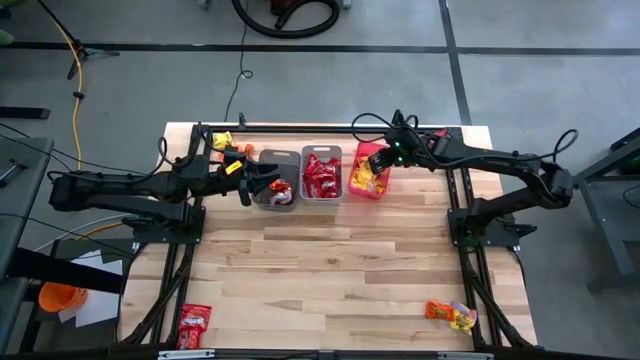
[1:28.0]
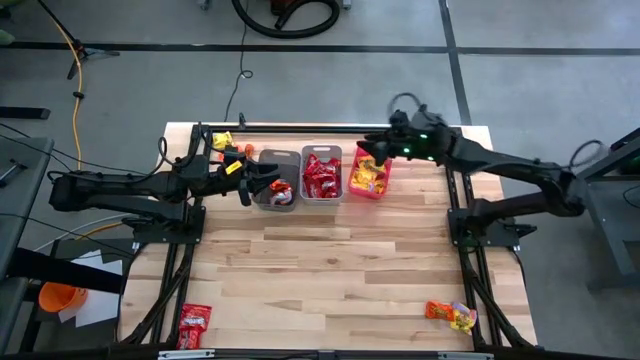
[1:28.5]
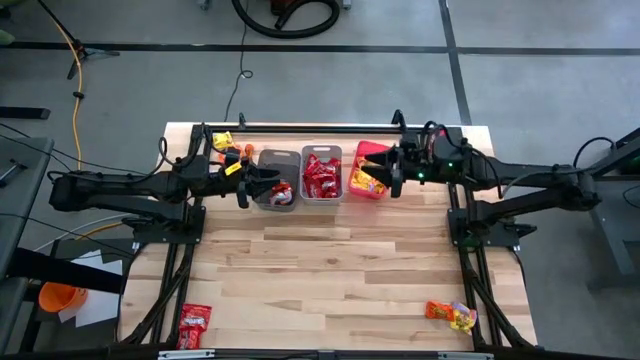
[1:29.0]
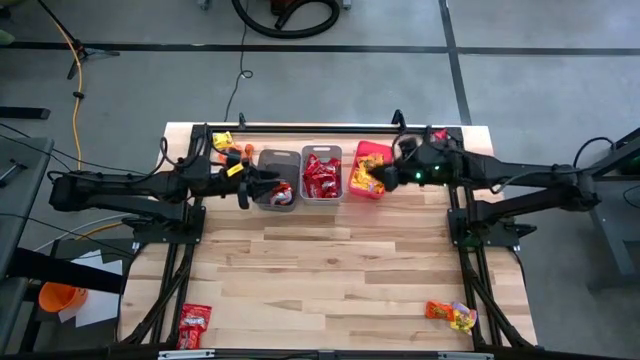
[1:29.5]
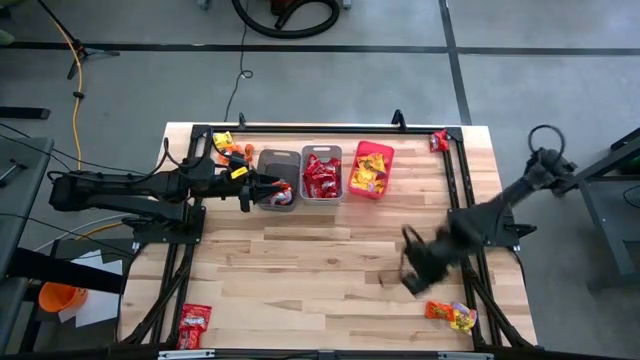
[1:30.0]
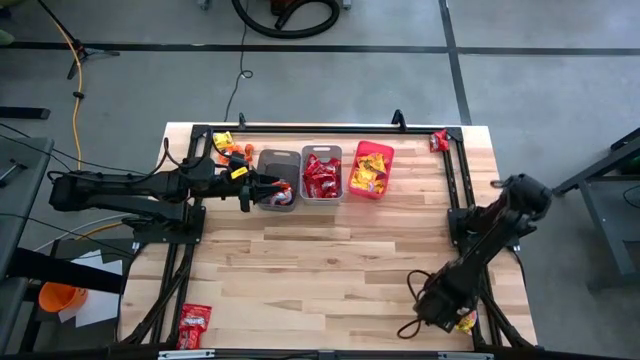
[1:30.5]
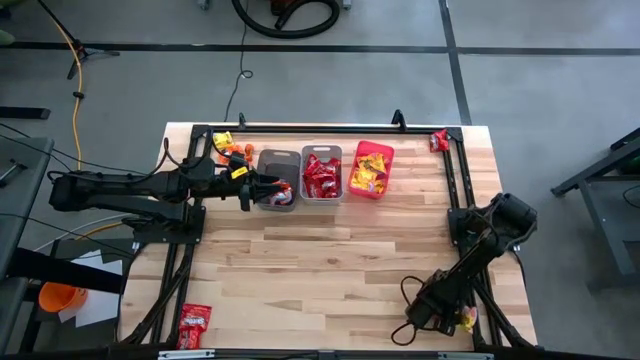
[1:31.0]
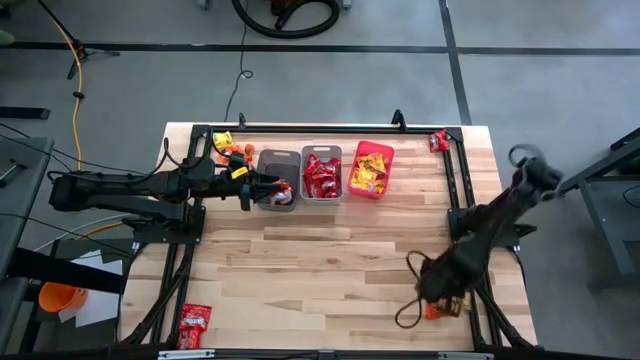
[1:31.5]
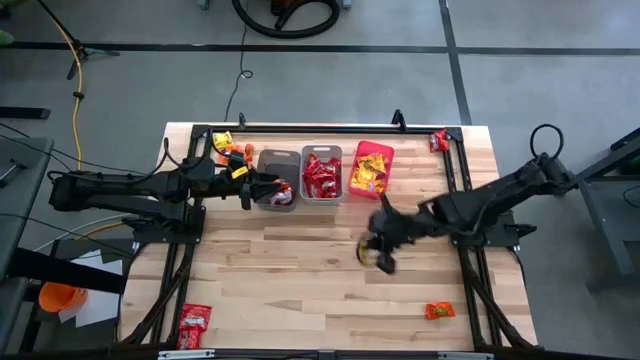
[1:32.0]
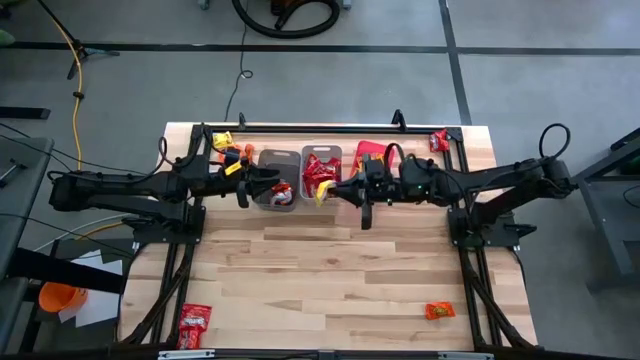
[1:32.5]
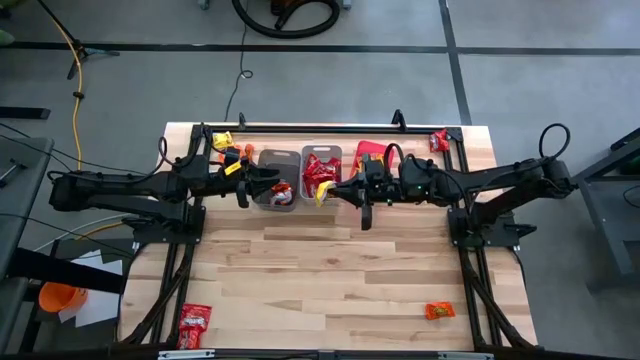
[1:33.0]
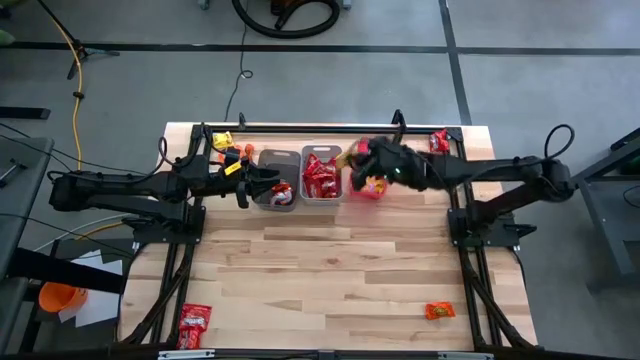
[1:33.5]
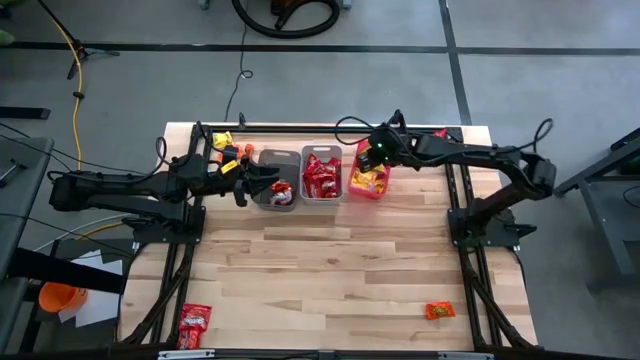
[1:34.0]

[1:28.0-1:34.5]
Task: Sort candy
Put the bottom right yellow candy into the red bin

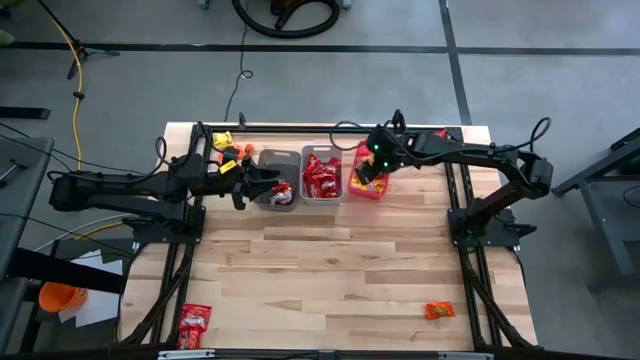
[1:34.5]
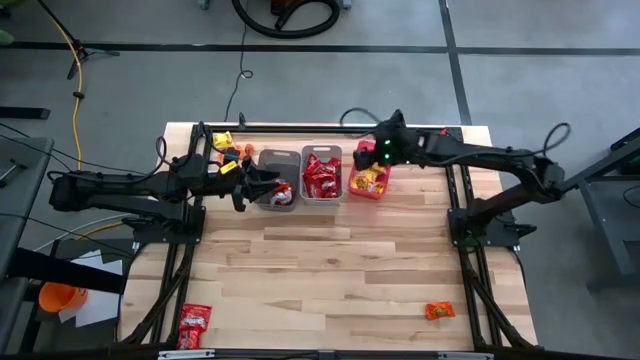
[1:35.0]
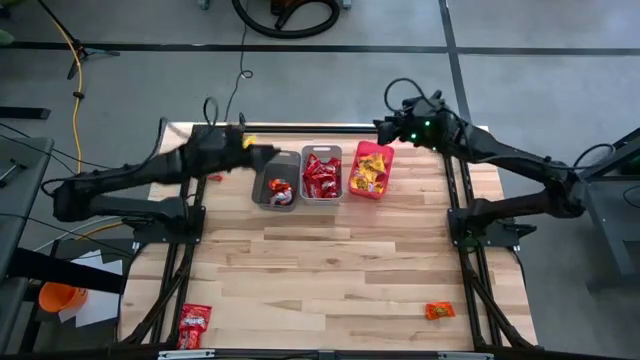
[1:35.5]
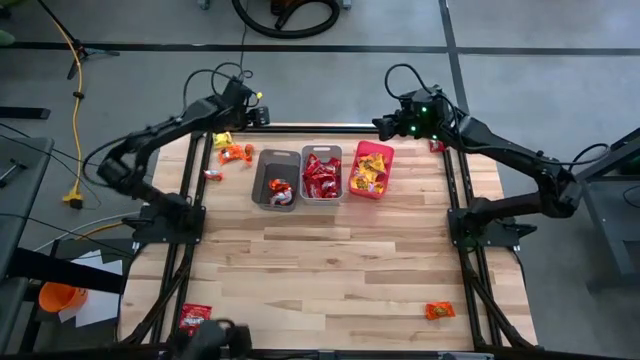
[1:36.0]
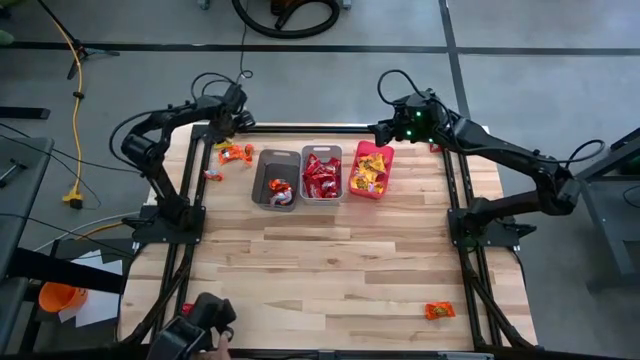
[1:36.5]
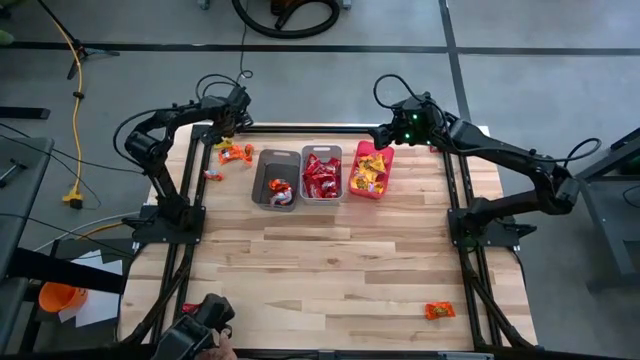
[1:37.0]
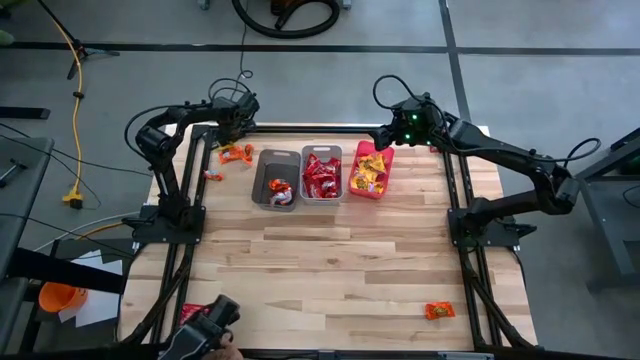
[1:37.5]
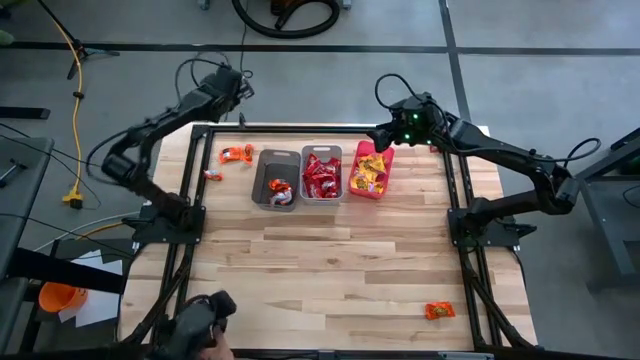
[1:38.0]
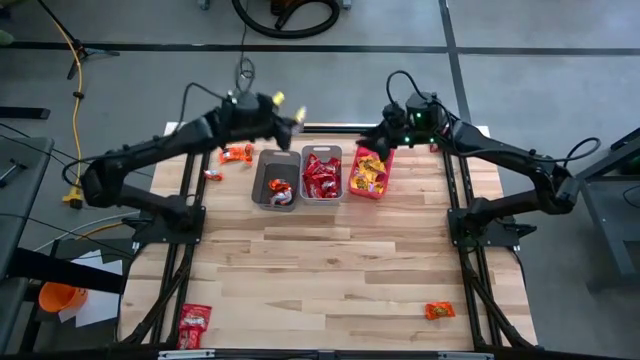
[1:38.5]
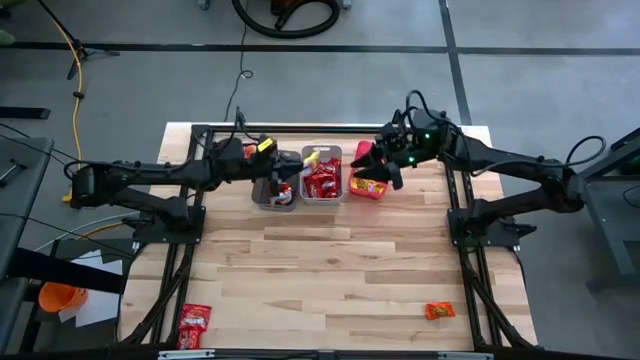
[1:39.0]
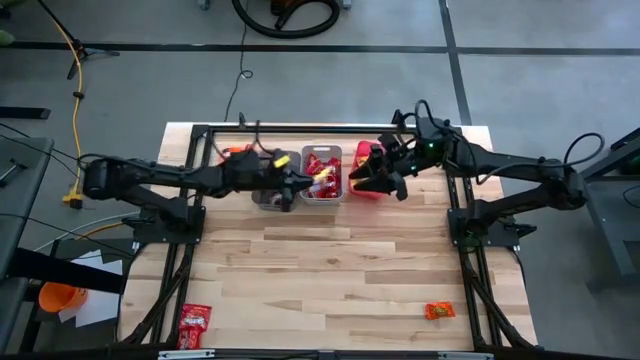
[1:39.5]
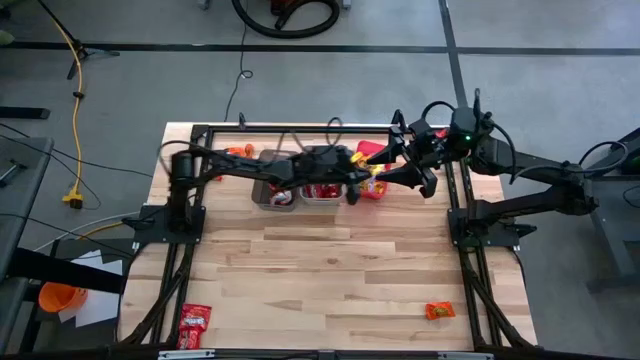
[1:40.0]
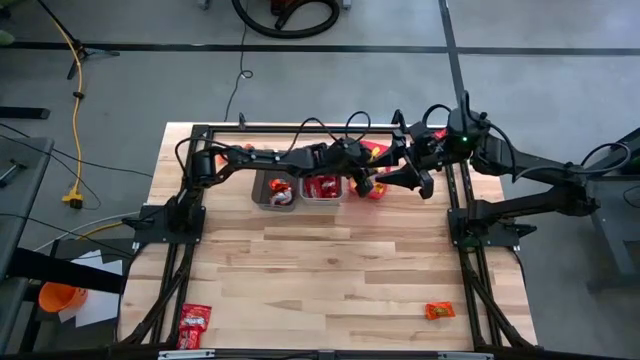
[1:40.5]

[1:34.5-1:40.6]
Put the to left yellow candy into the red bin

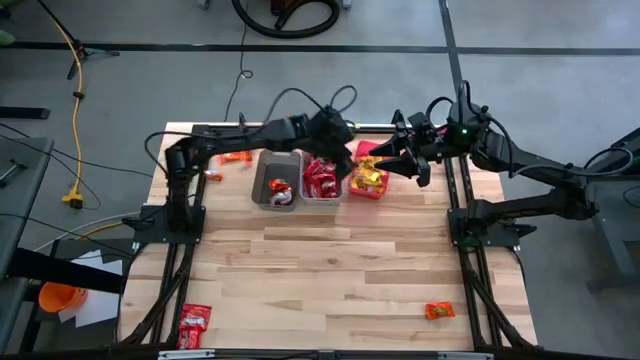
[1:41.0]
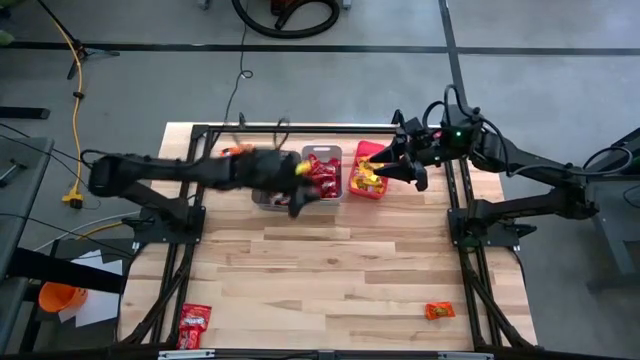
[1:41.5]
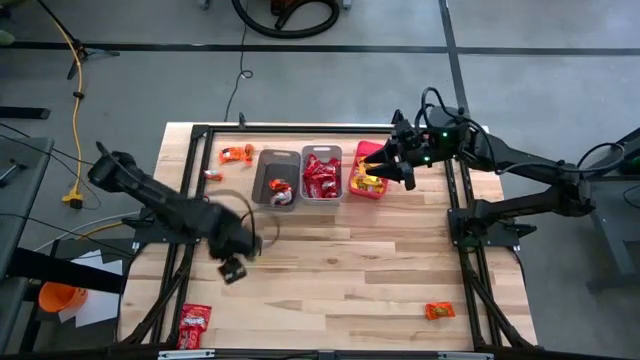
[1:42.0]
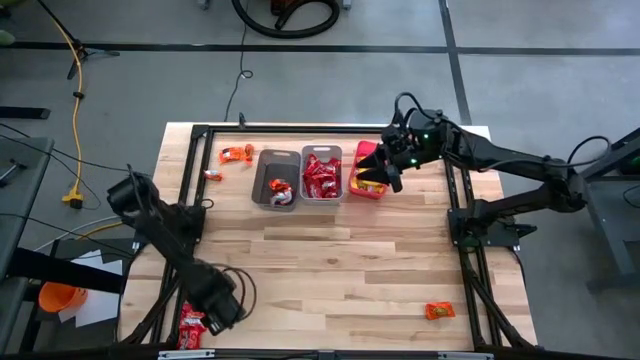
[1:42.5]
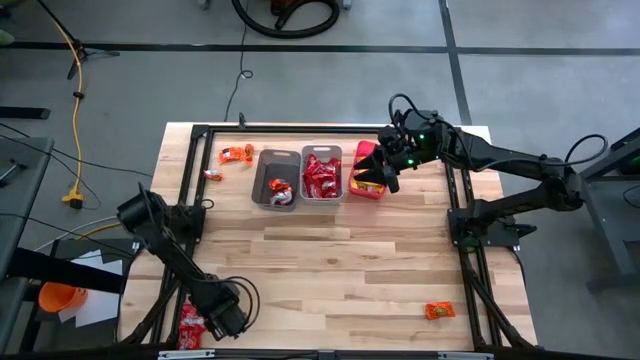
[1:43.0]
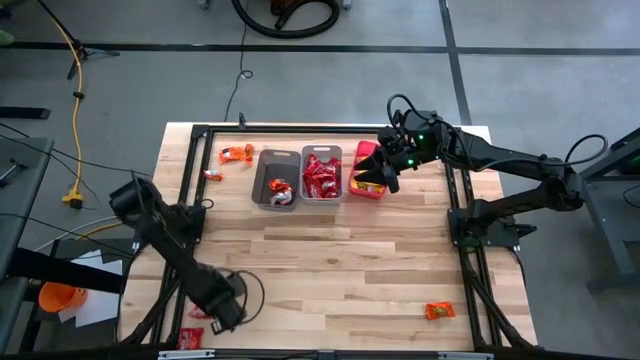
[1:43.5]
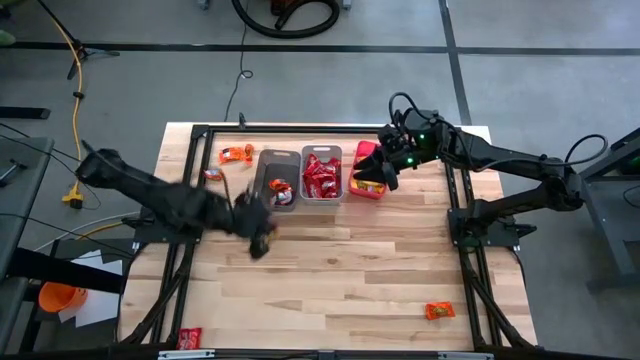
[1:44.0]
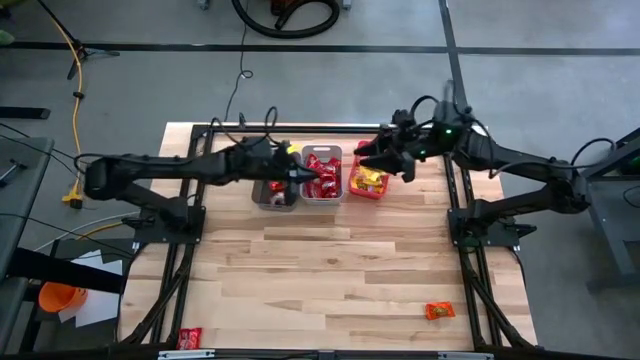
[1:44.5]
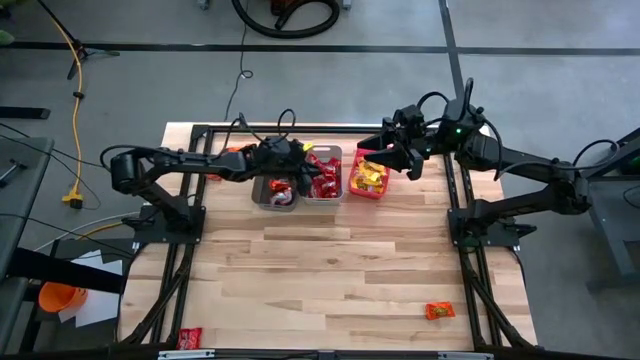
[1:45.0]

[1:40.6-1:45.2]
Put the bottom left red candy into the center gray bin

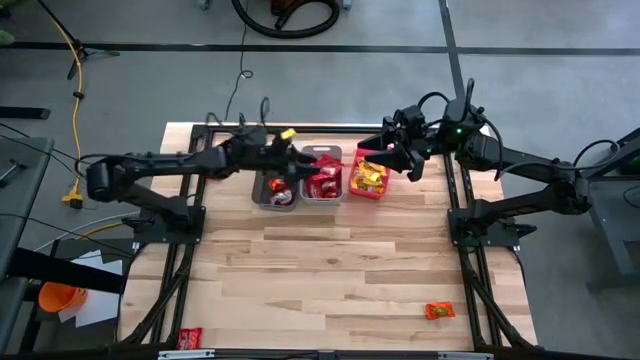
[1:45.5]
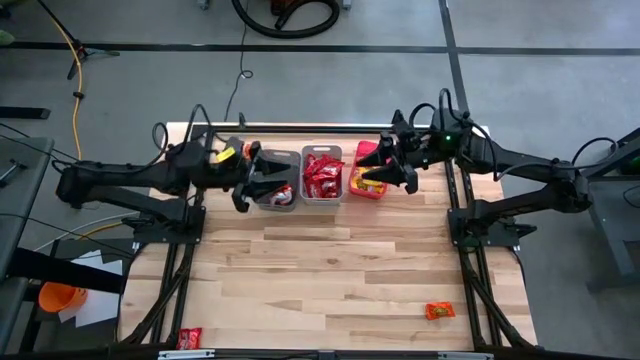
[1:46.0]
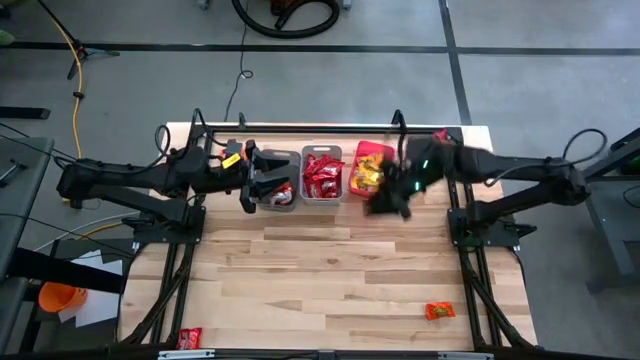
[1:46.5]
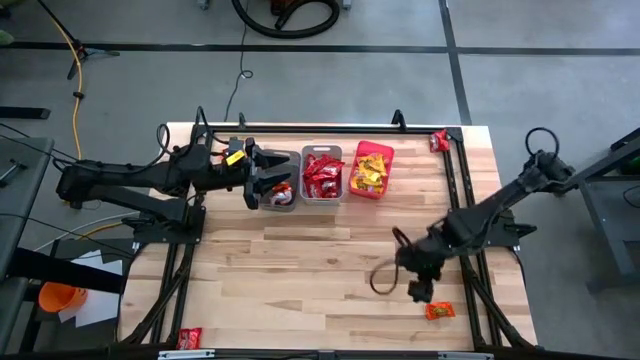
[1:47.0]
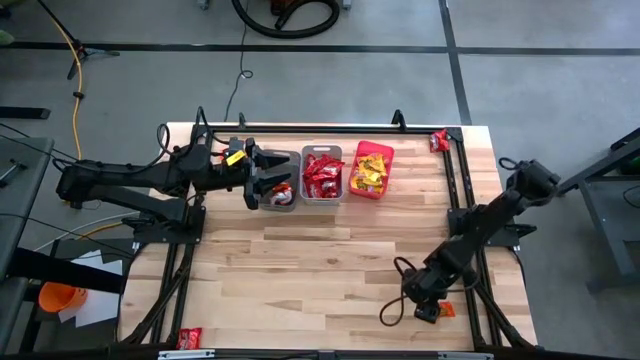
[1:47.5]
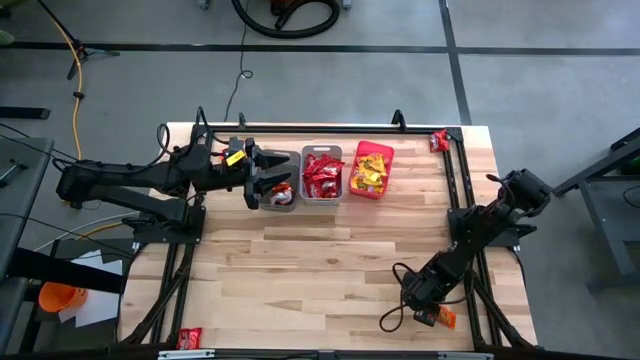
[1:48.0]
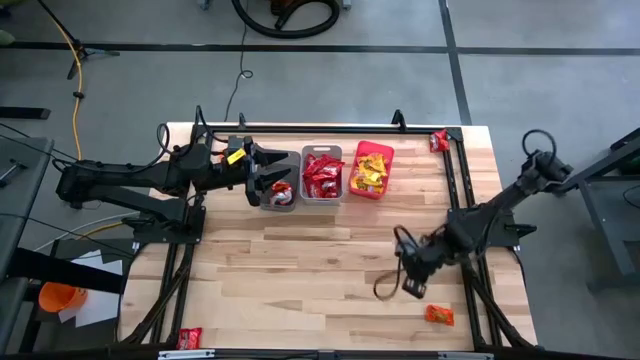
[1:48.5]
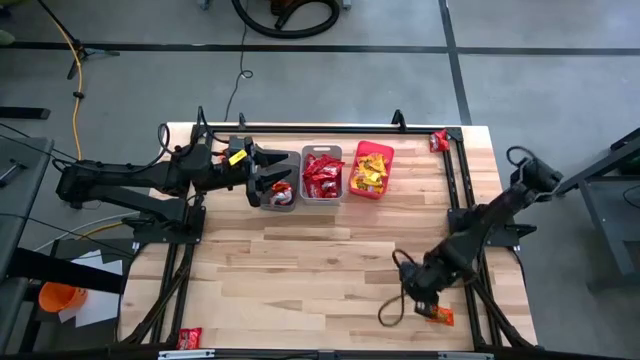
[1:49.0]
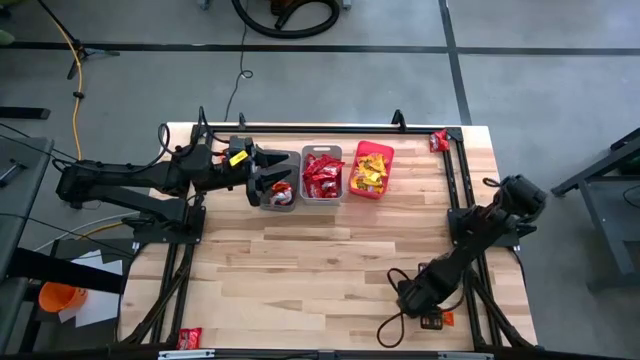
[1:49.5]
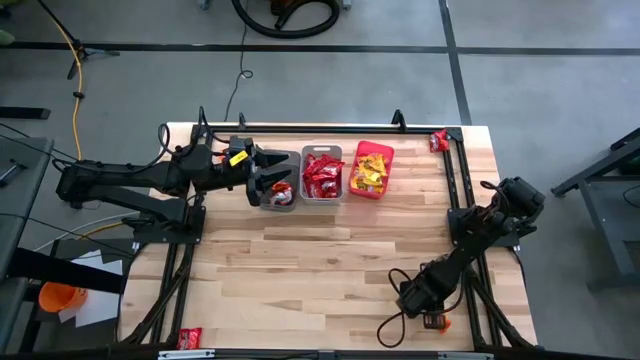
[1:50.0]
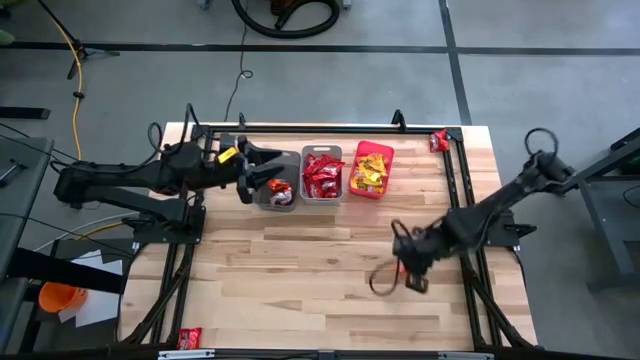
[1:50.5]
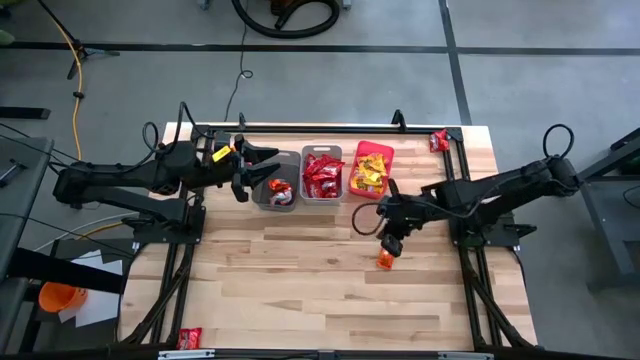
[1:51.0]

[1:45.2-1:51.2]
Put the bottom right orange candy into the black bin
